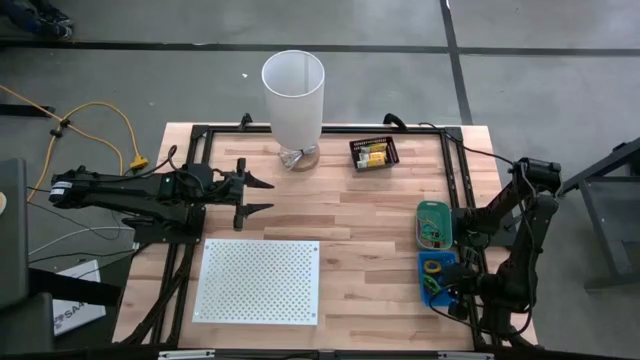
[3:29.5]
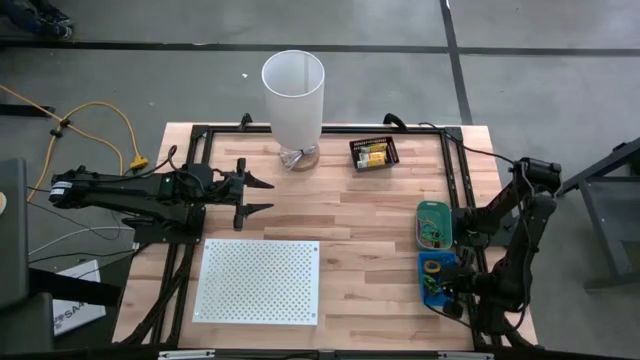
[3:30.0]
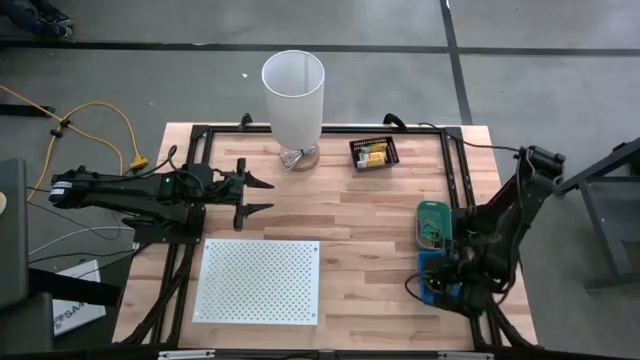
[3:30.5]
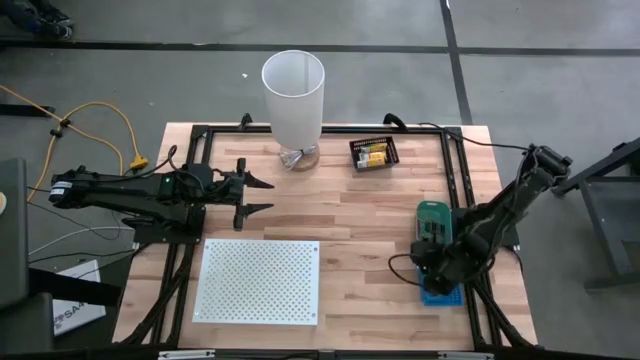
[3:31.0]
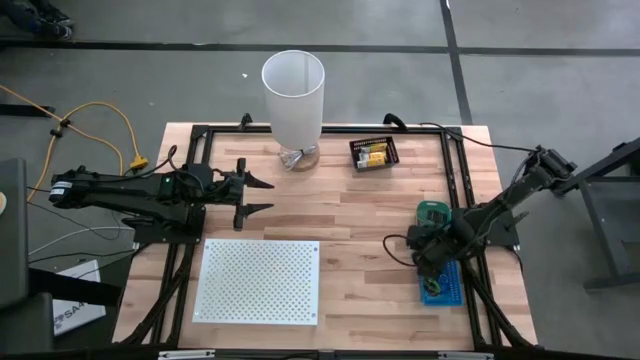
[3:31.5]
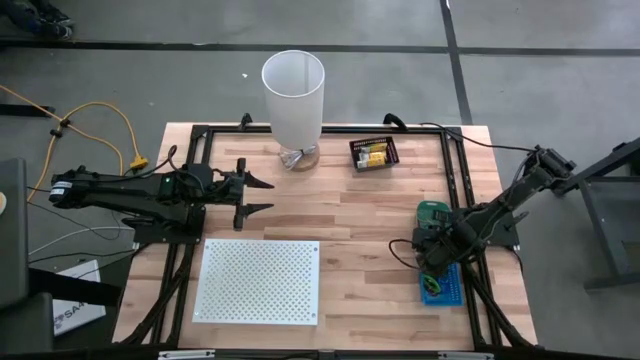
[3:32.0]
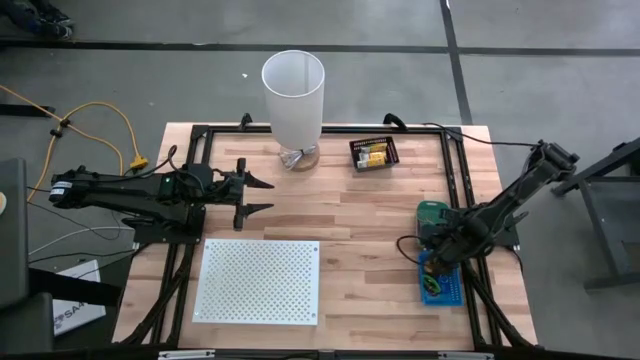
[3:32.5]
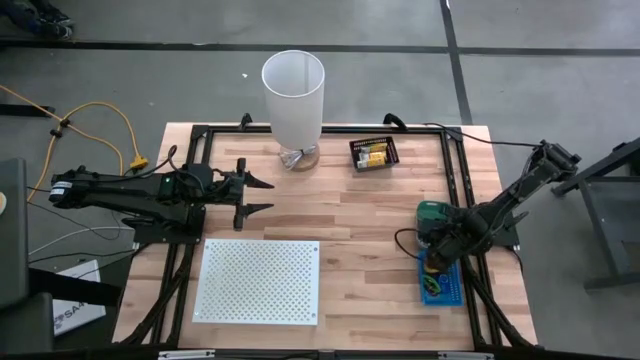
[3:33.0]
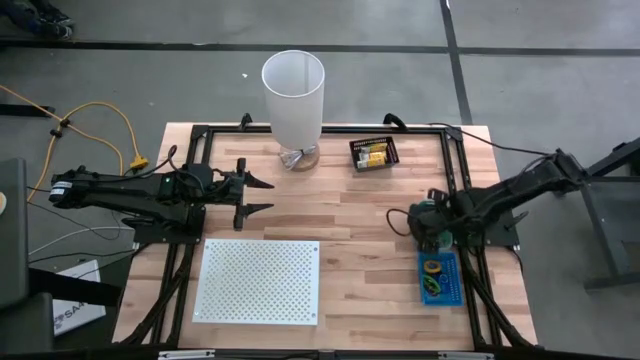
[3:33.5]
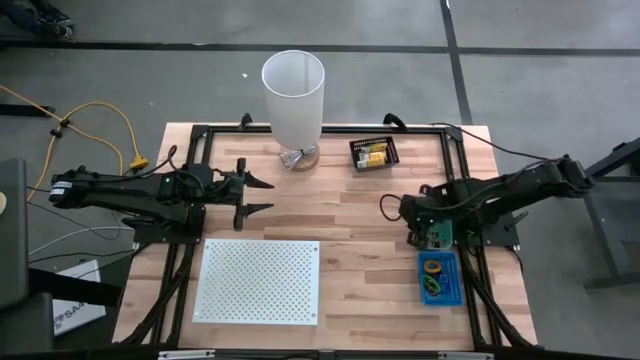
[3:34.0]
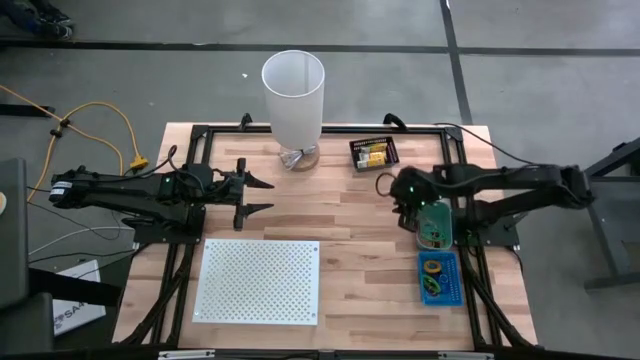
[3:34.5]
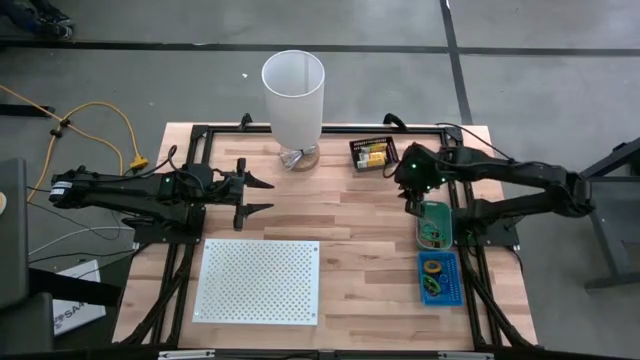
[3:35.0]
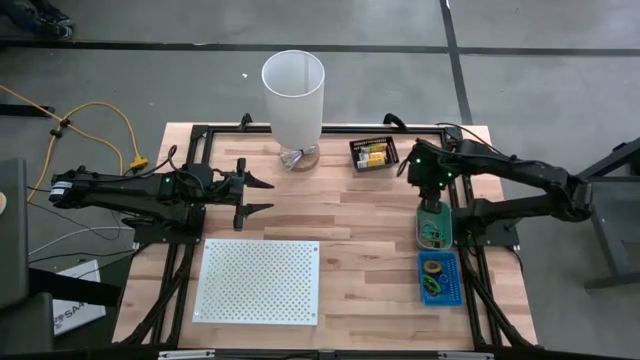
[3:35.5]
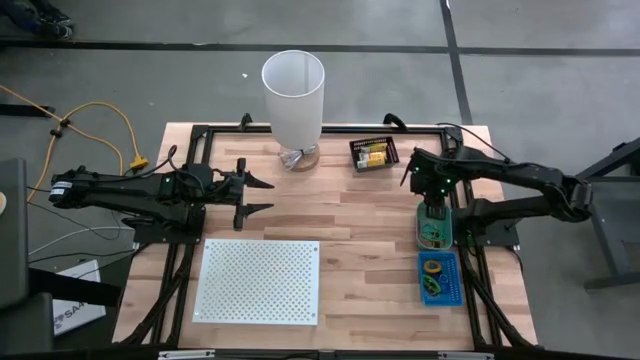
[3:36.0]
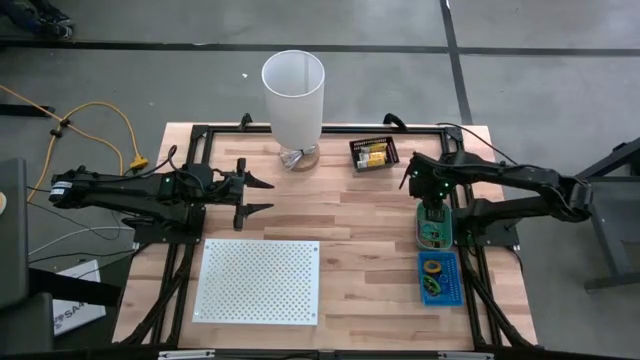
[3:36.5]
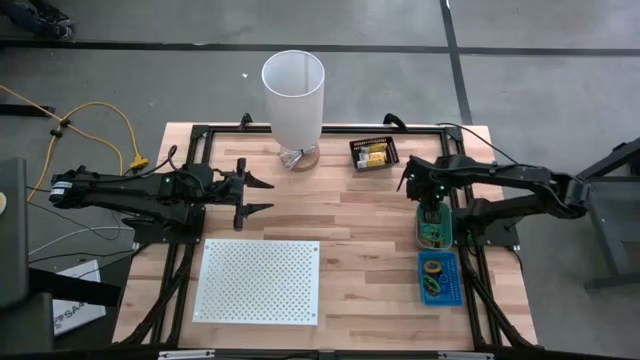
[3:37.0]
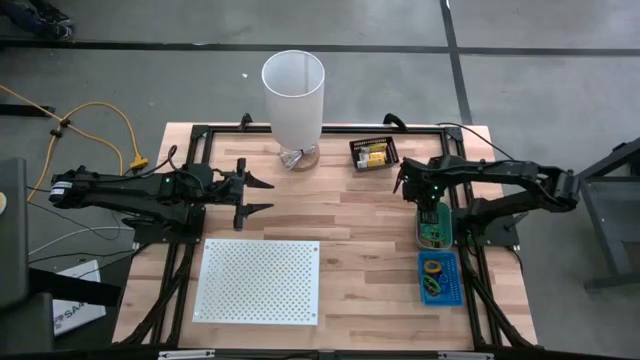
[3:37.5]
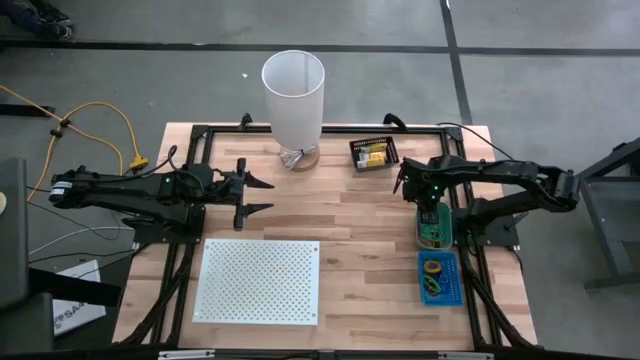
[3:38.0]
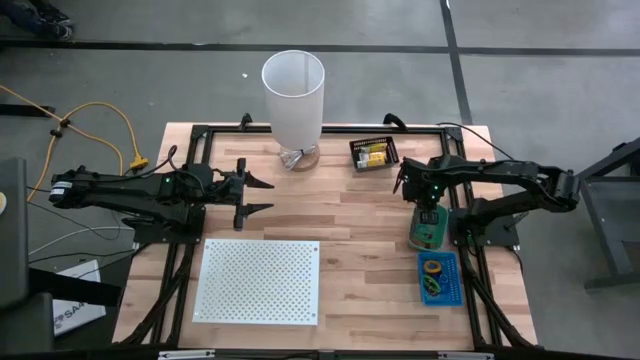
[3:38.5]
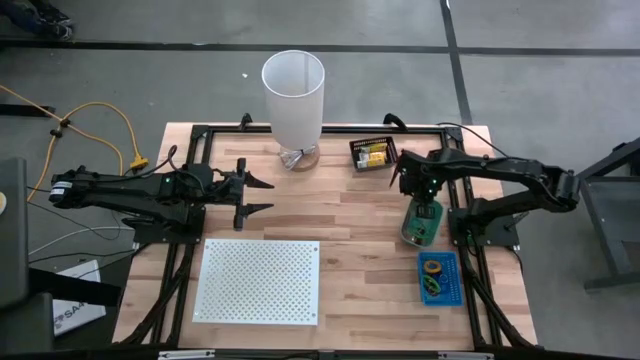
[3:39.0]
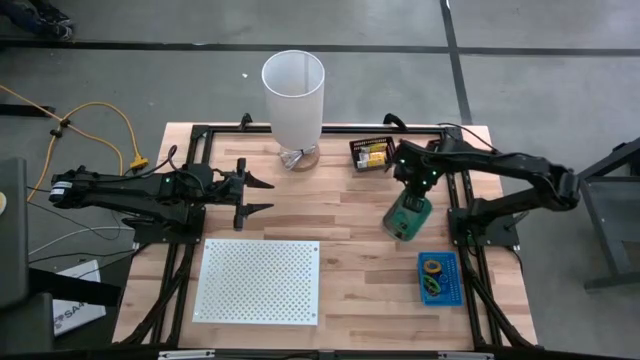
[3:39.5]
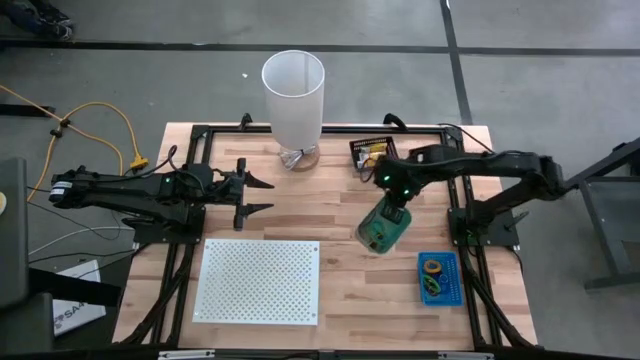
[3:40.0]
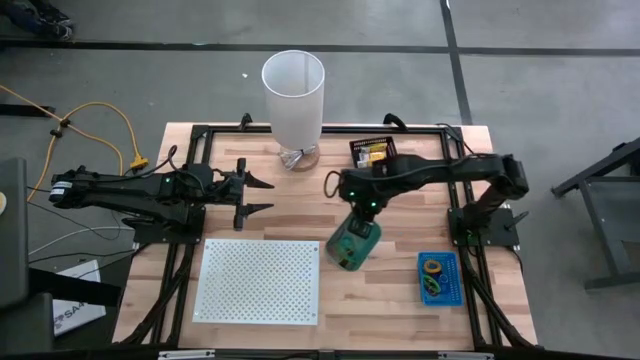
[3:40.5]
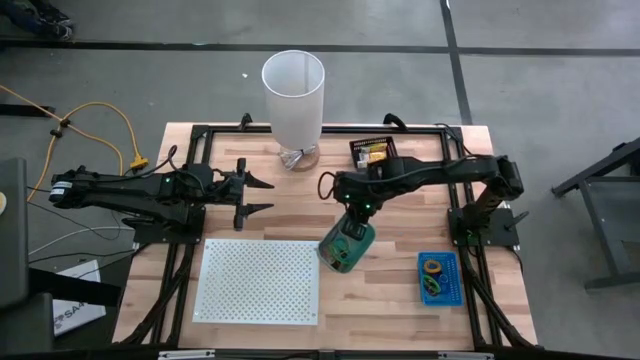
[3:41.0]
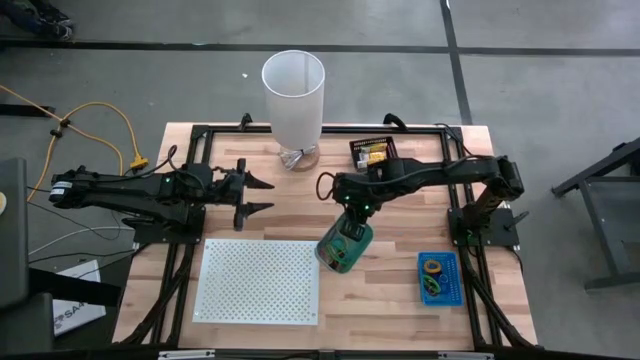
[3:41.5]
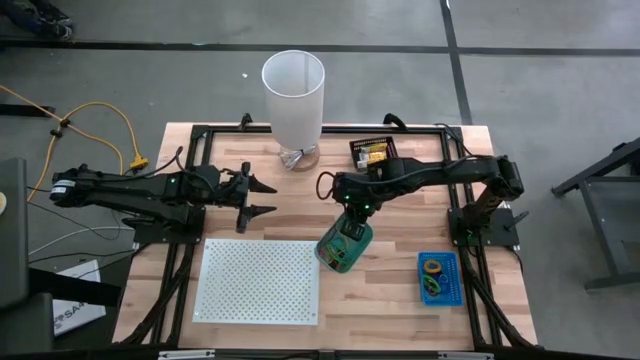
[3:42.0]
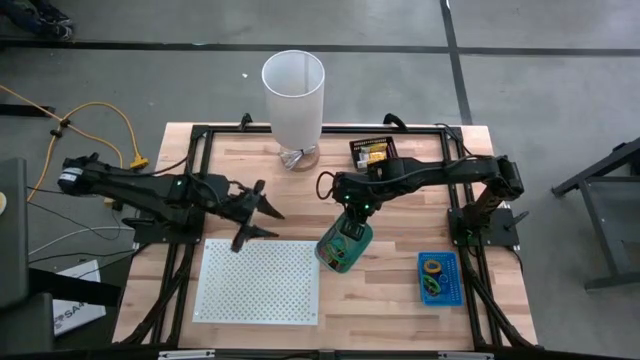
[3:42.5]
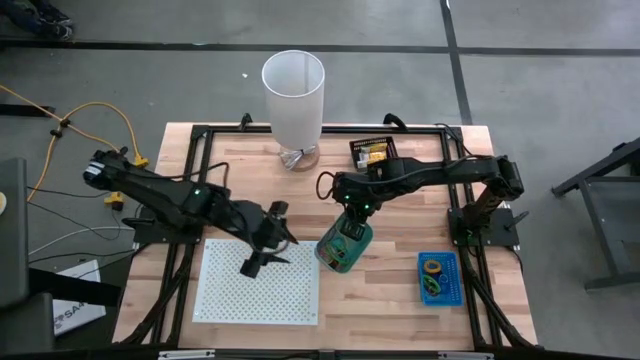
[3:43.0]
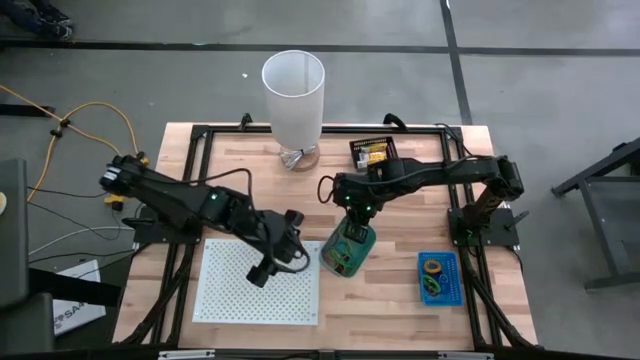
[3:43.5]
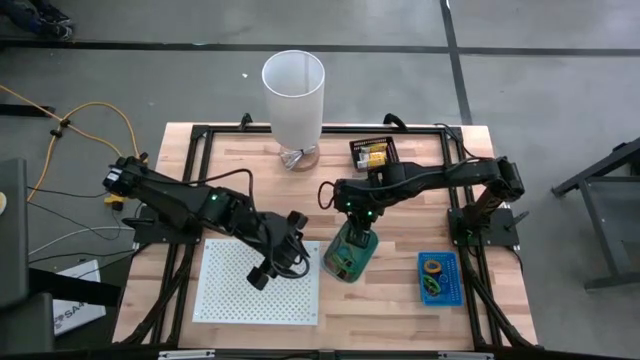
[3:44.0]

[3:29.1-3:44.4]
Task: Pick & Place Office Desk Supplies
Put the green bin on the shelf

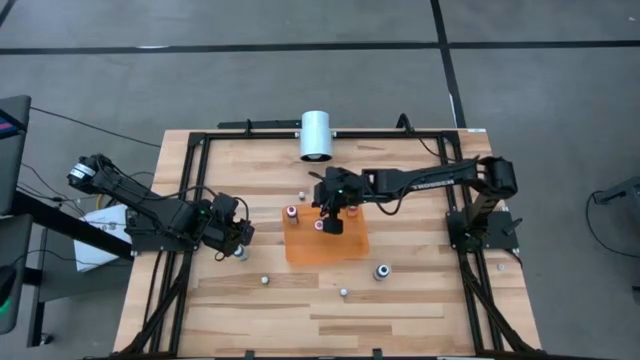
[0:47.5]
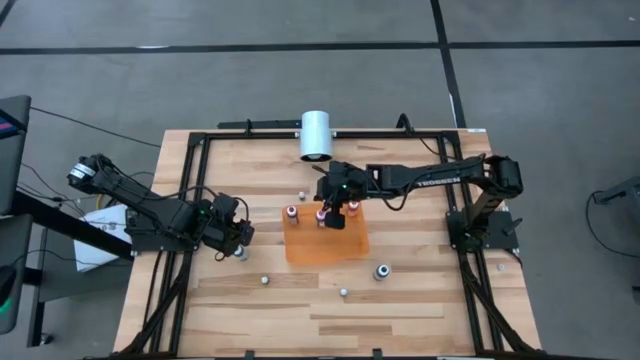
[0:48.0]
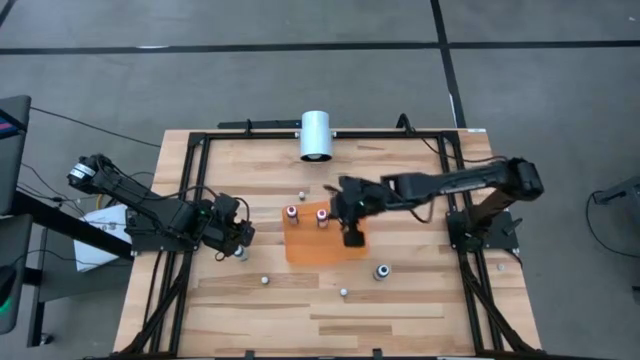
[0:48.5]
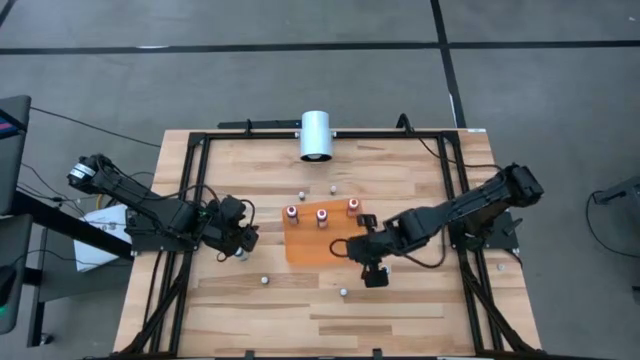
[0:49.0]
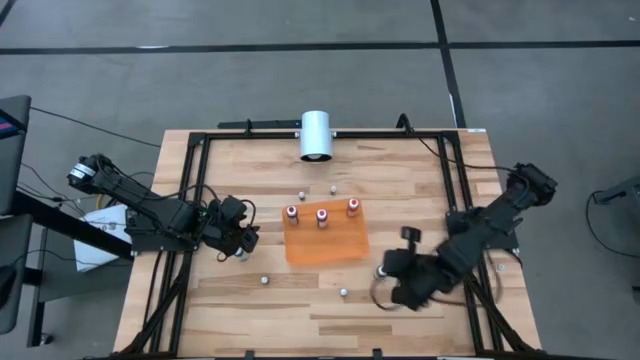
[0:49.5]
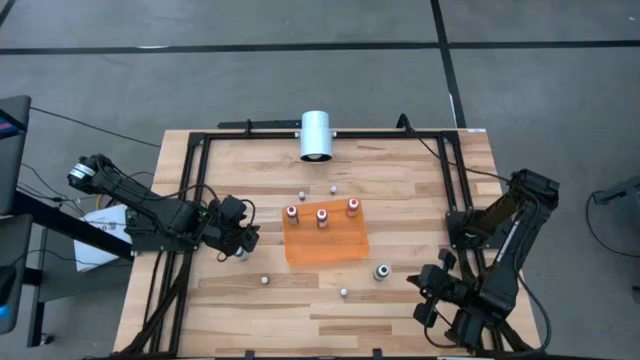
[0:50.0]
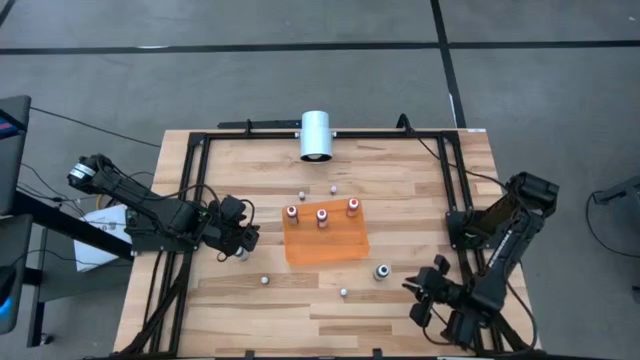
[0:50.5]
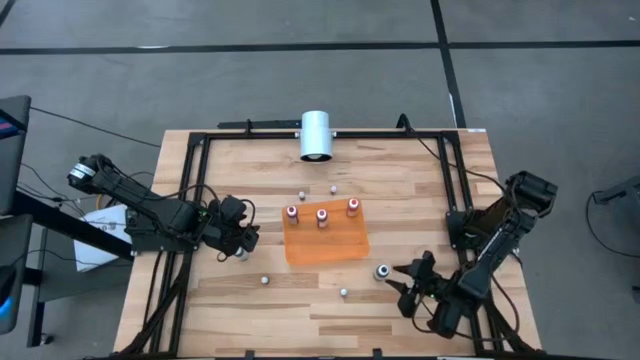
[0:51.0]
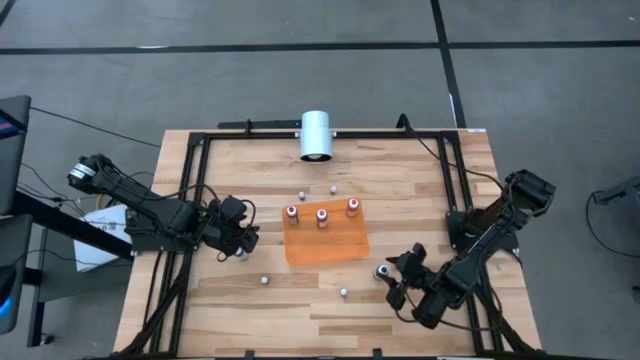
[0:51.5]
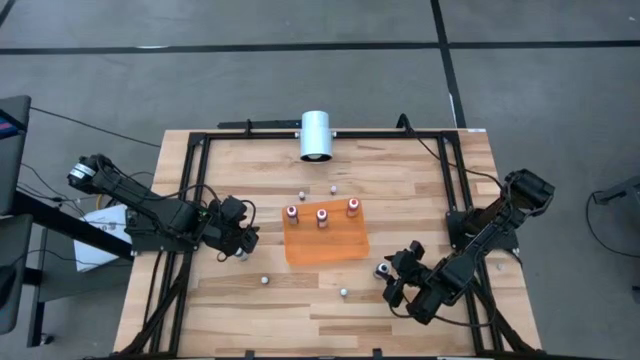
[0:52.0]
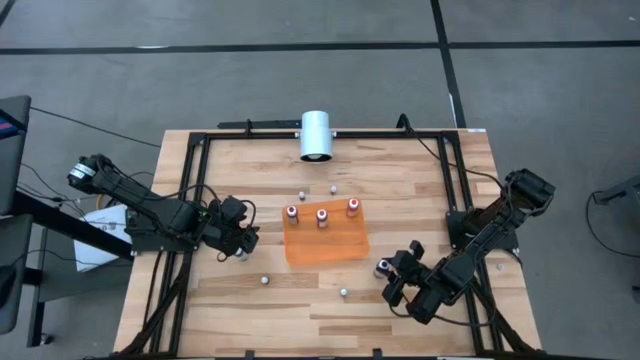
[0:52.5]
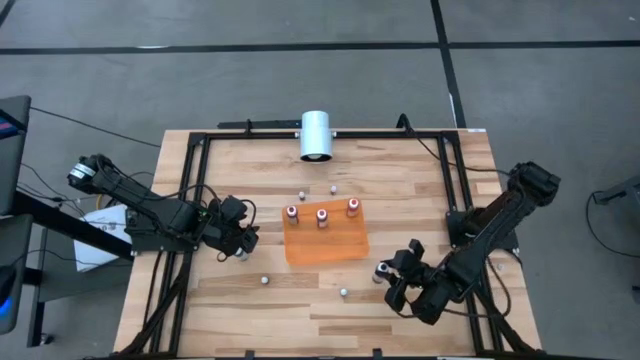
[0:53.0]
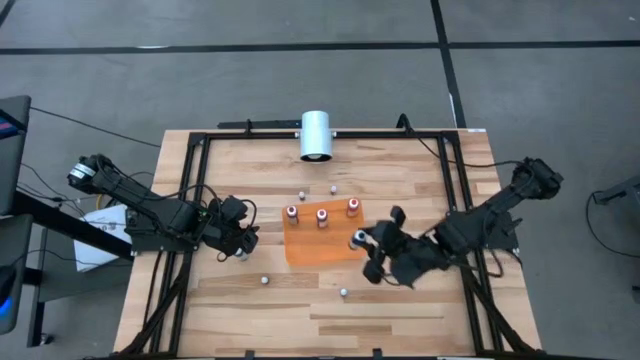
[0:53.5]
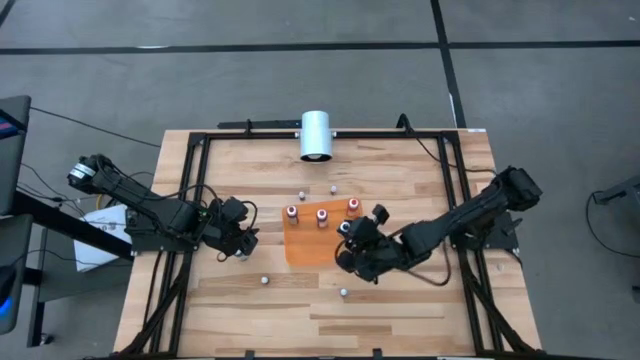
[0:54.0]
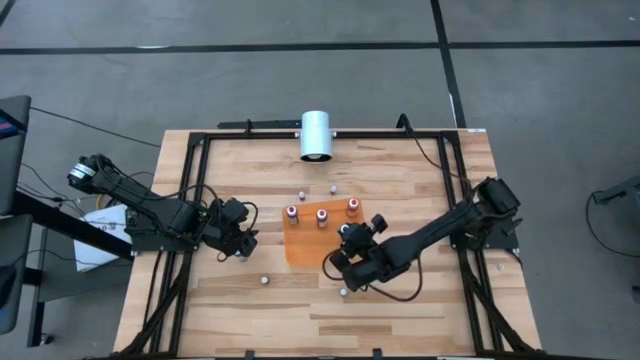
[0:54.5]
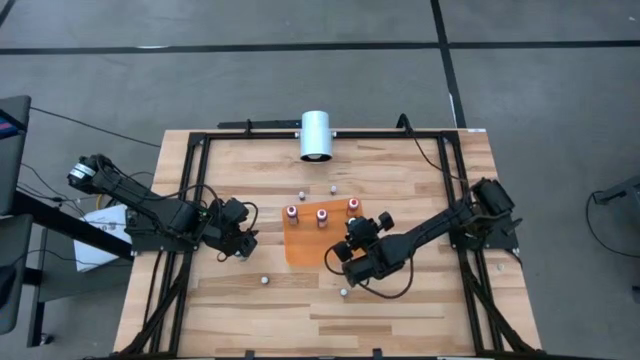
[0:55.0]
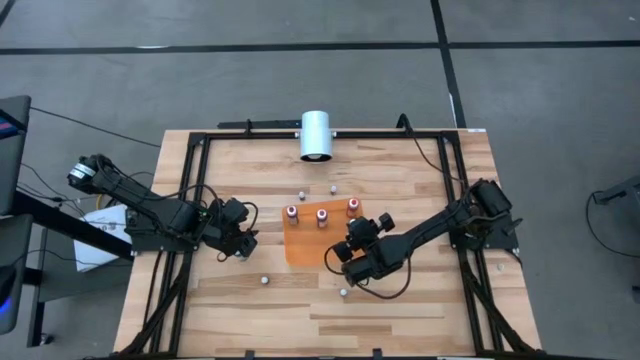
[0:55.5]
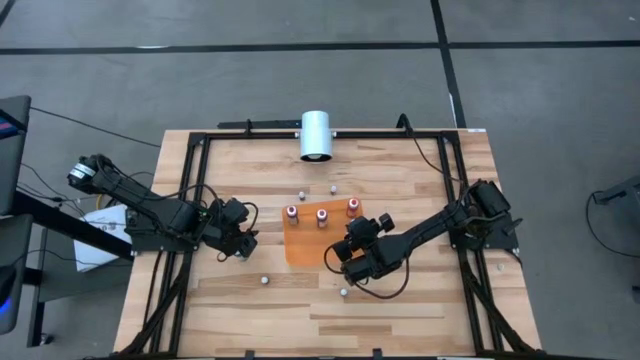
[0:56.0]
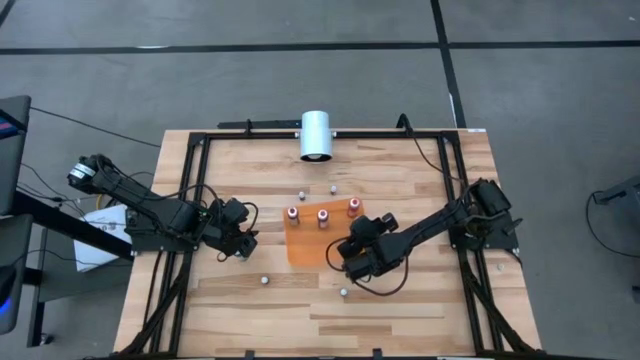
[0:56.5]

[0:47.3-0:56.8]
Task: Pick & Place food coloring
Put the large black food coloring bottle into the orange container
